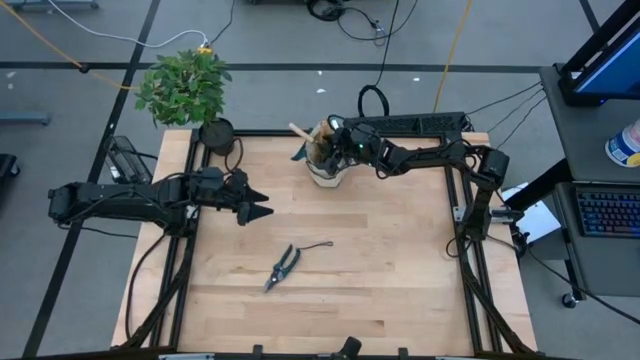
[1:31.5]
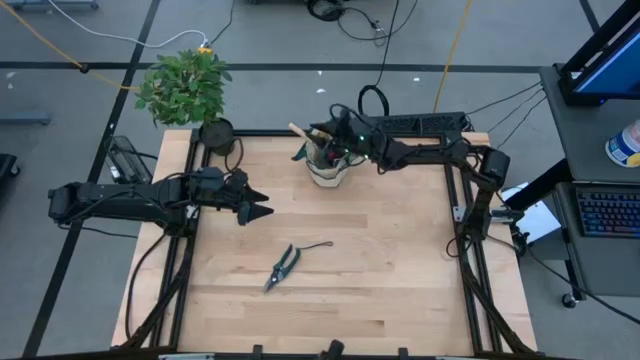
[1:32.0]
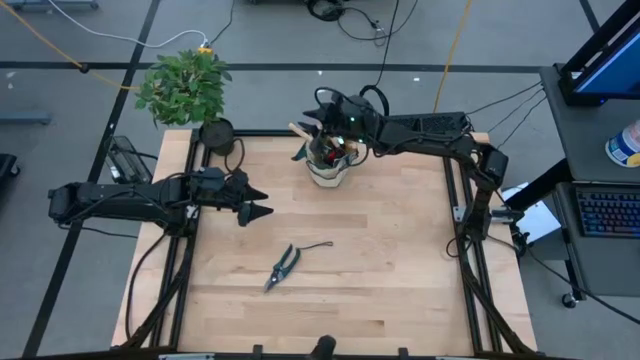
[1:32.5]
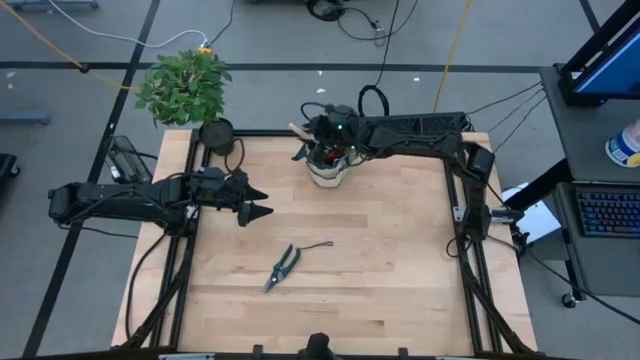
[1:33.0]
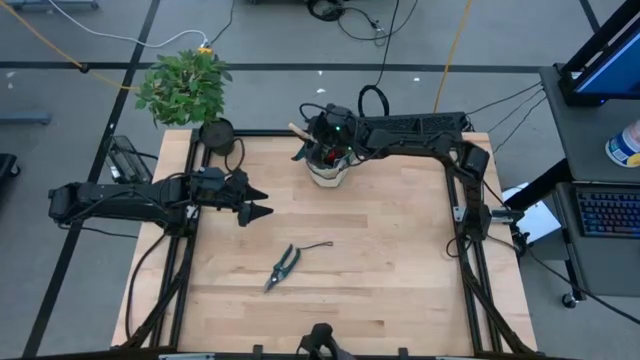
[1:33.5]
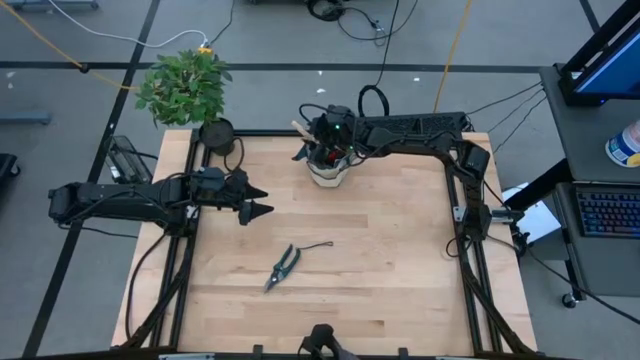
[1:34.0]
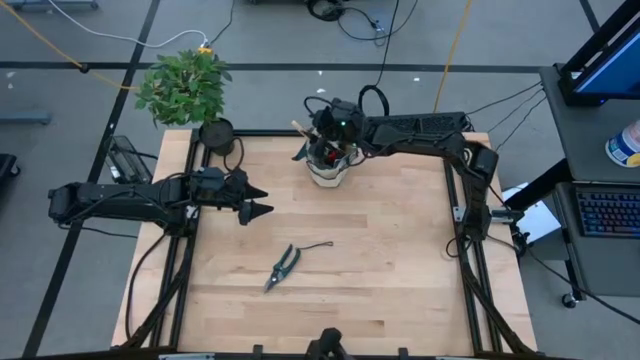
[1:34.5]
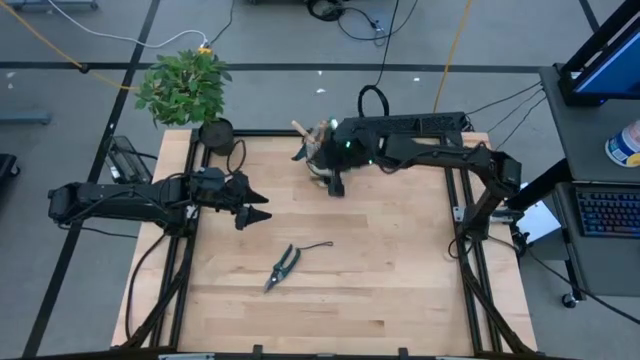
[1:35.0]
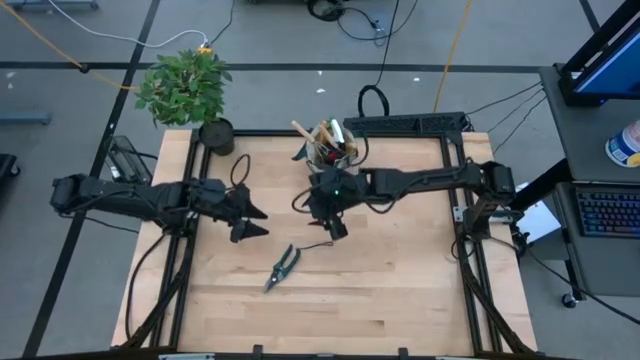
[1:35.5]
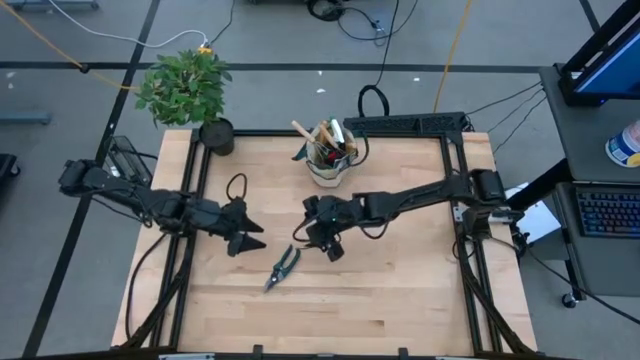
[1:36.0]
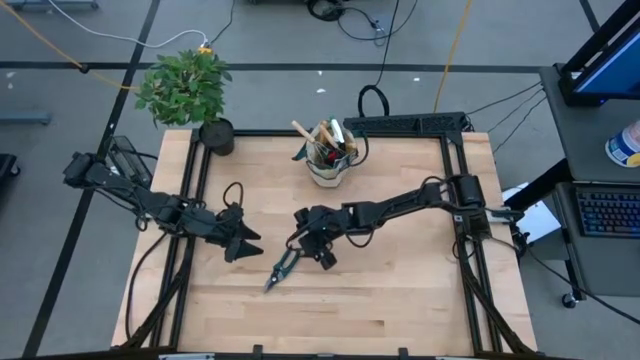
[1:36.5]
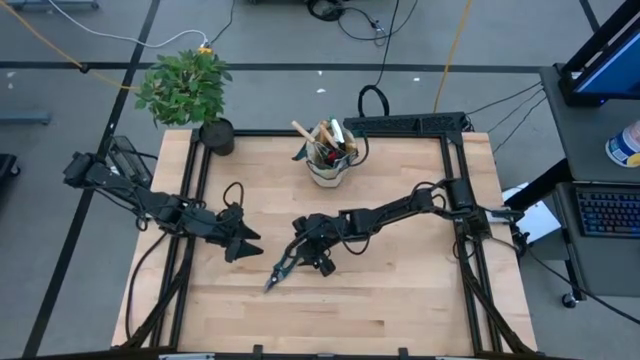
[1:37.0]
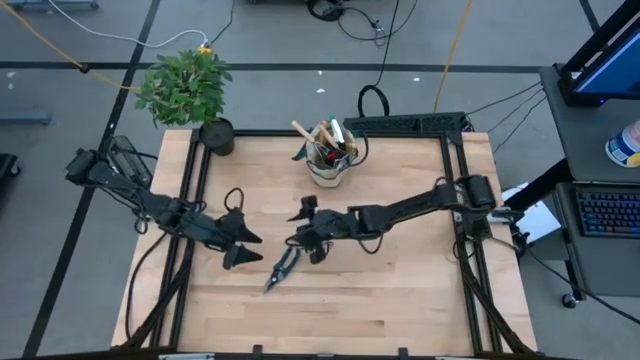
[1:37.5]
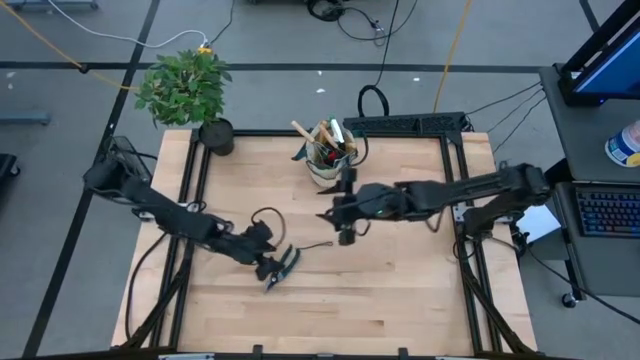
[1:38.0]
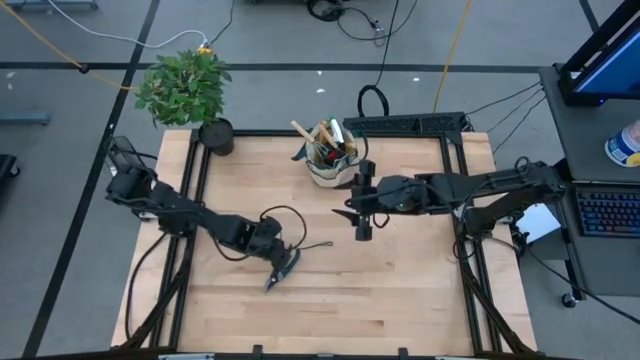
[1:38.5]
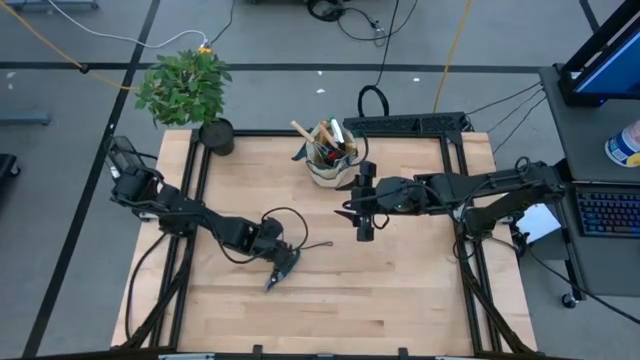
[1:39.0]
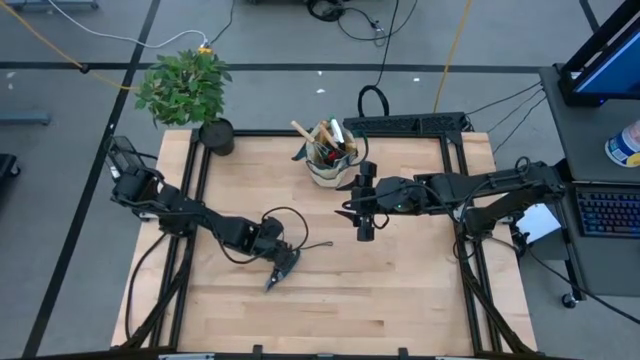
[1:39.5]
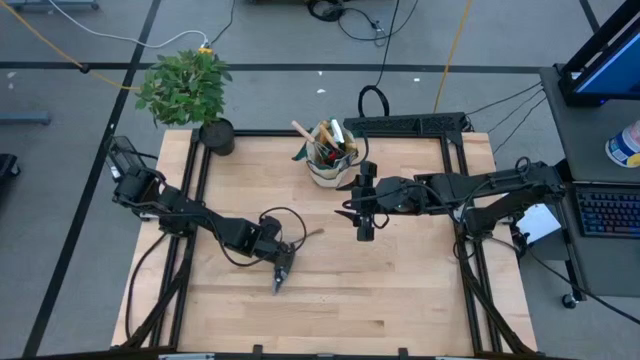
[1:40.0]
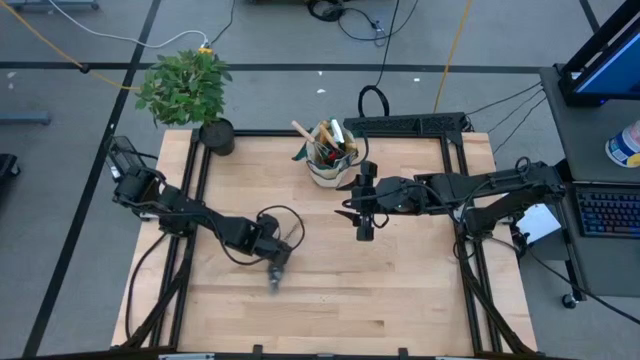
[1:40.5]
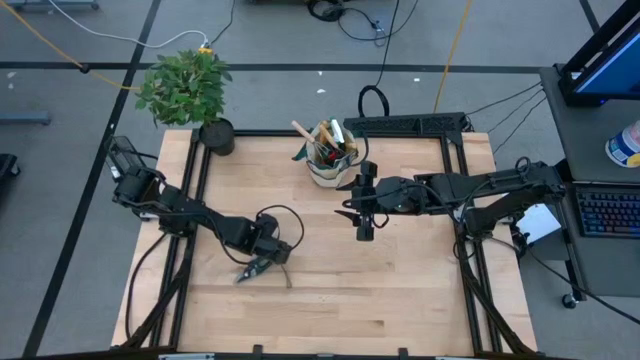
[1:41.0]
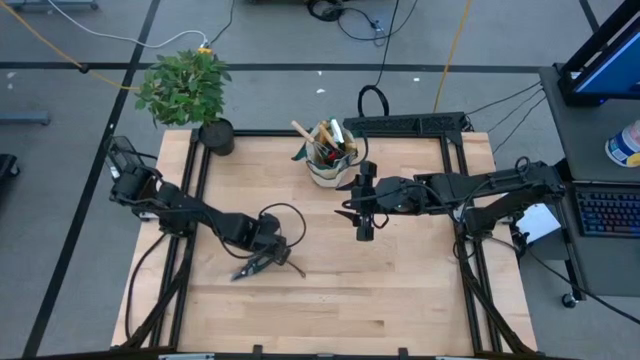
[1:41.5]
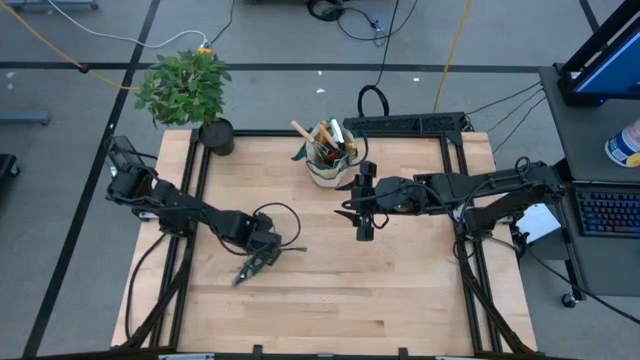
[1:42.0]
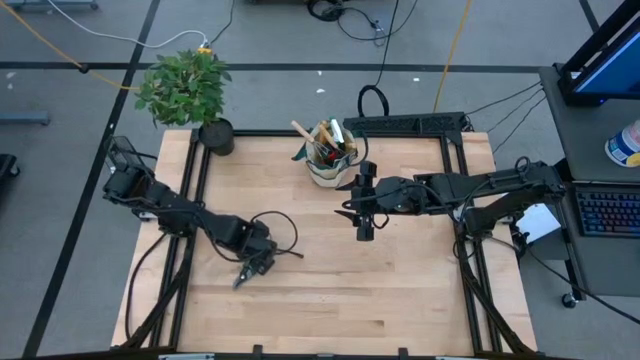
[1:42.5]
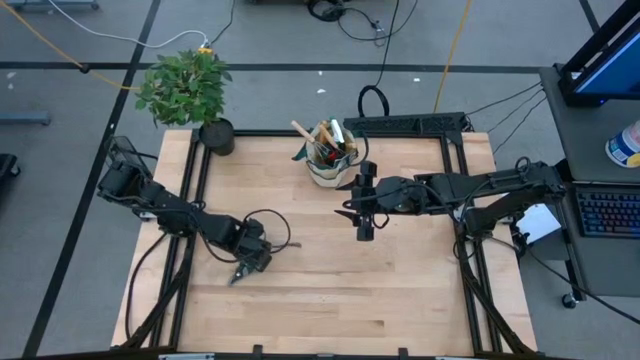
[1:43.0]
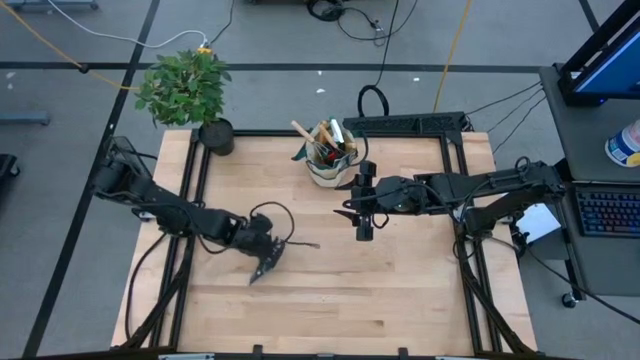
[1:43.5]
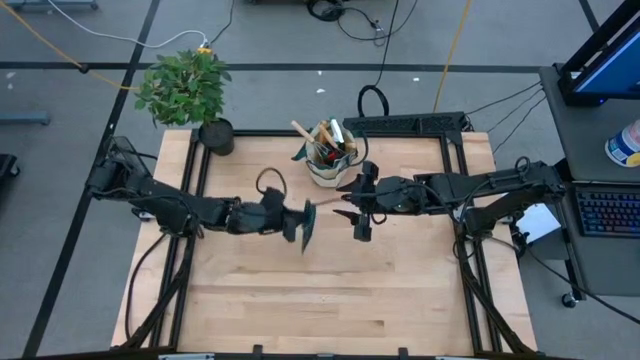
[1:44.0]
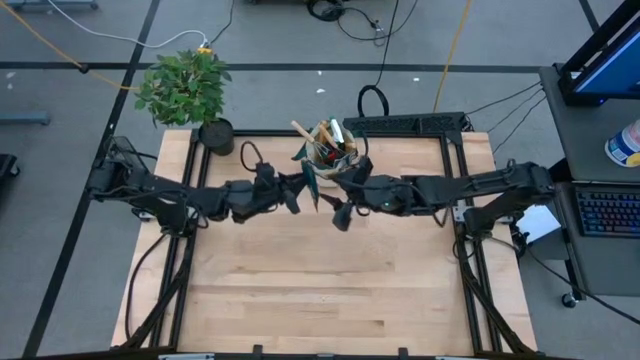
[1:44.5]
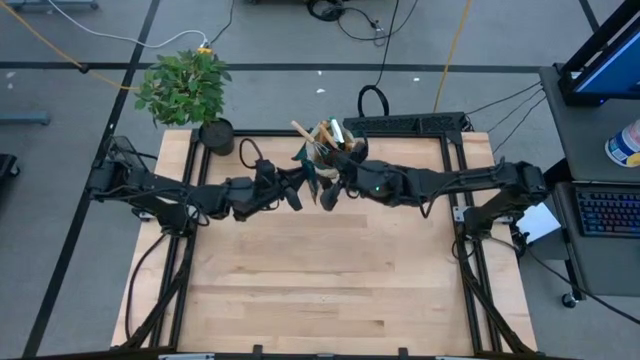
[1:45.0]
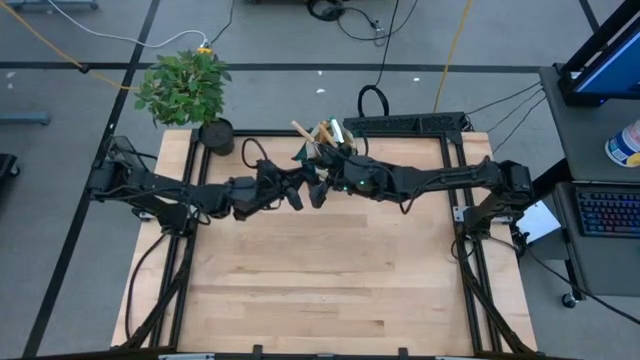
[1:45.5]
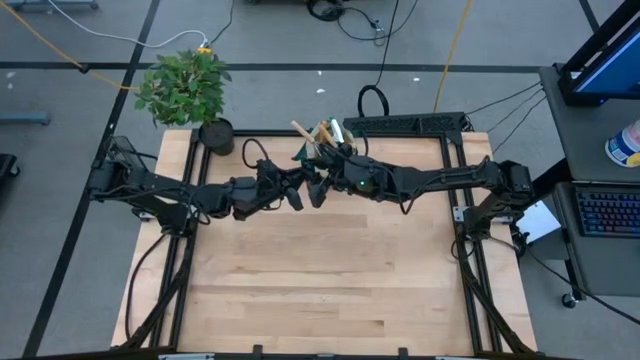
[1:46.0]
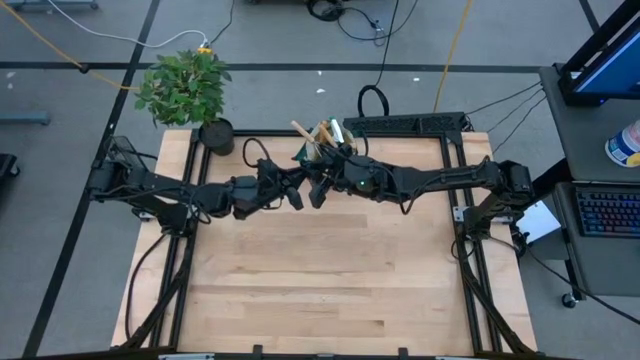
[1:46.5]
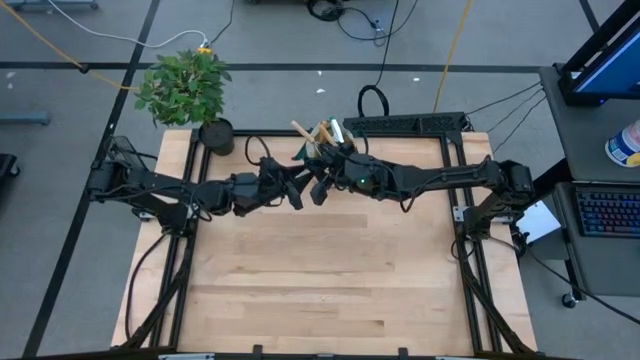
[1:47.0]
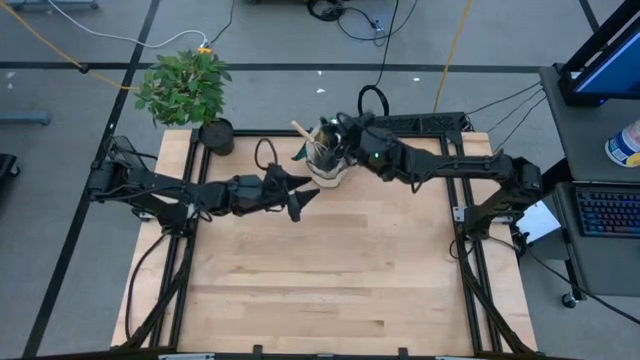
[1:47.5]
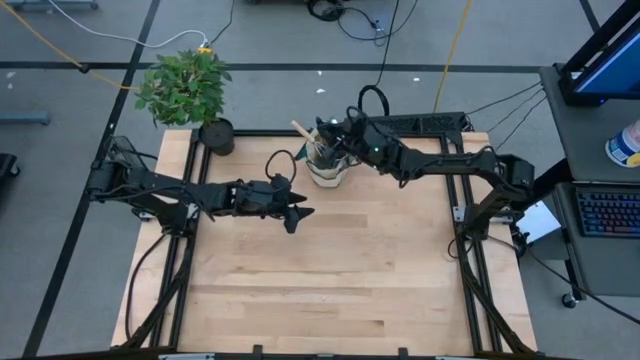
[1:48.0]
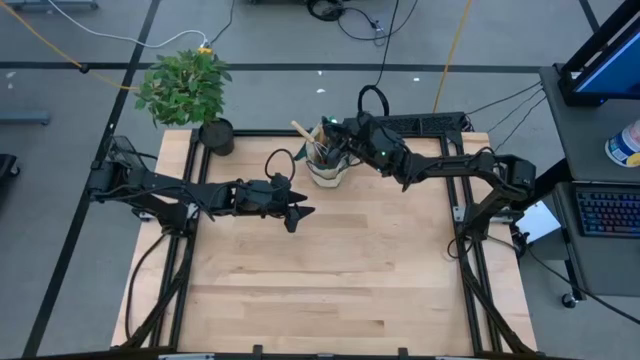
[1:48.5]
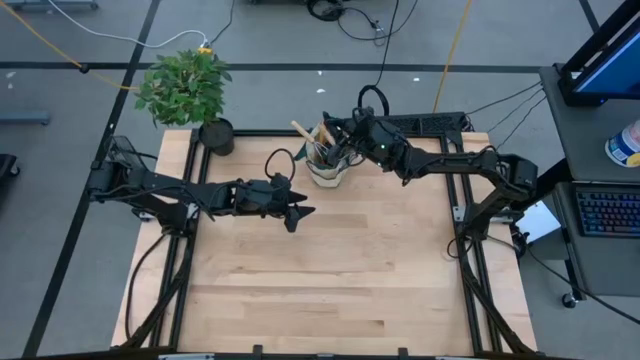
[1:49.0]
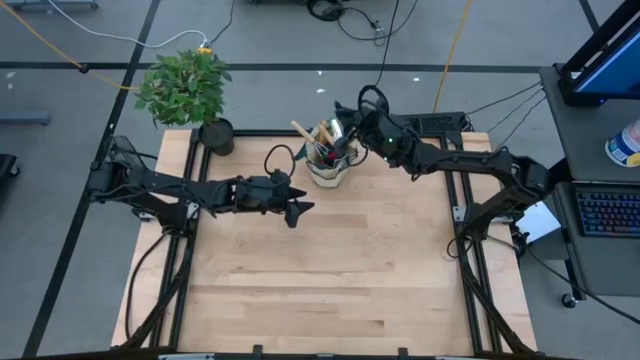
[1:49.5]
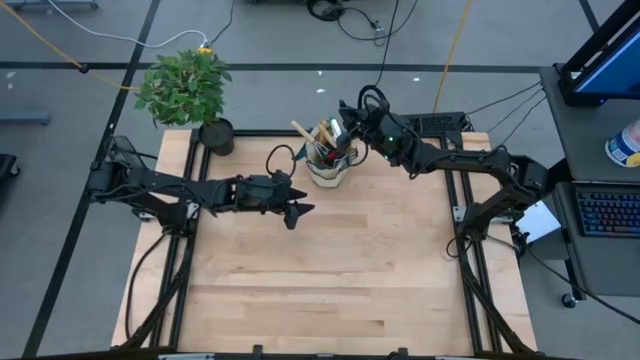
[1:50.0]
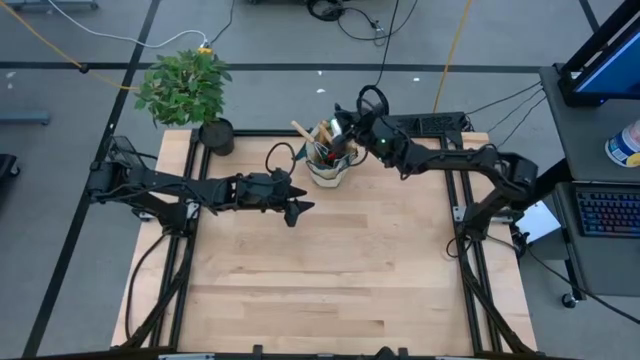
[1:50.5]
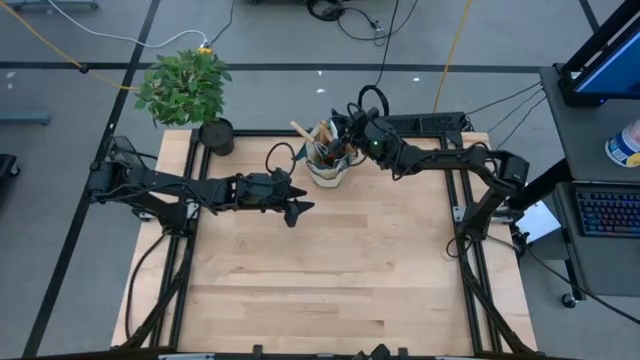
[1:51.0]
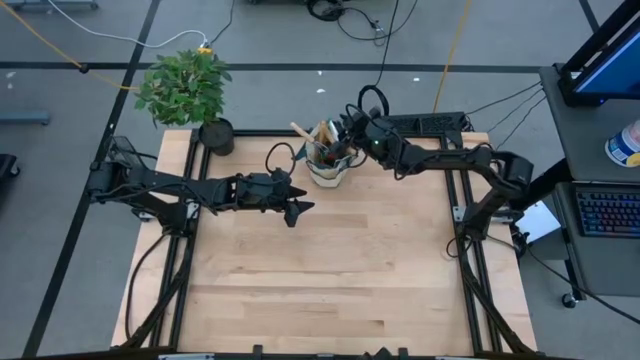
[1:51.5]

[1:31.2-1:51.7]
Task: Pick & Place Garden tools in Gardening bag
Put the green shear scissors into the brown gardening bag
